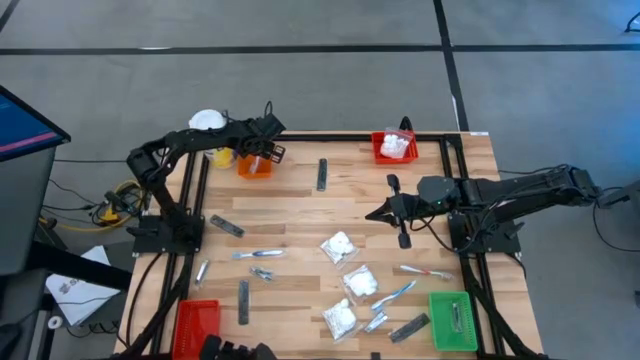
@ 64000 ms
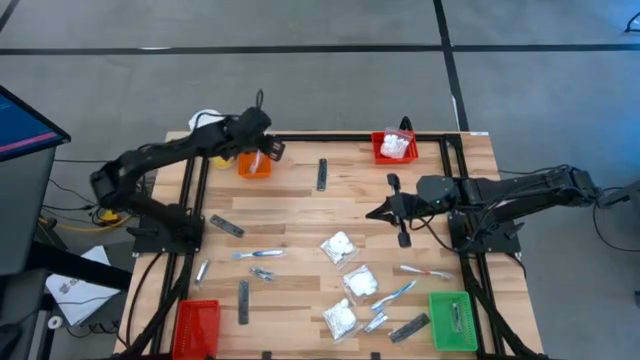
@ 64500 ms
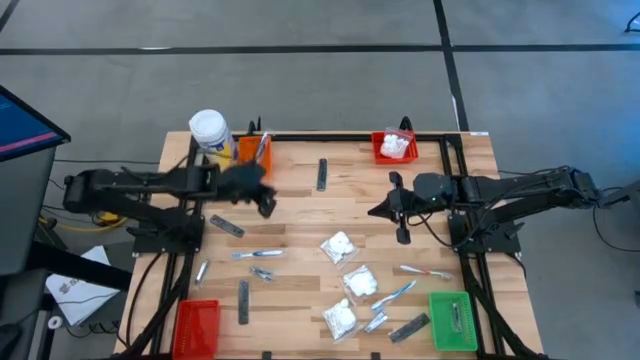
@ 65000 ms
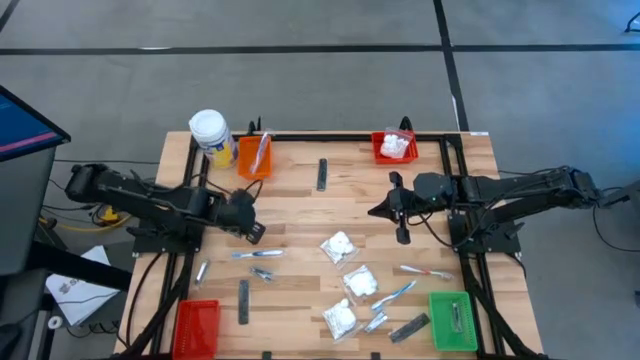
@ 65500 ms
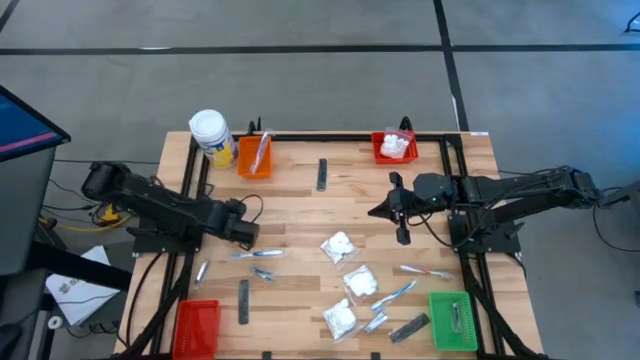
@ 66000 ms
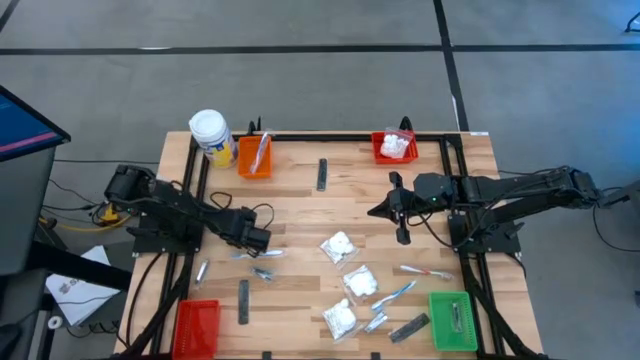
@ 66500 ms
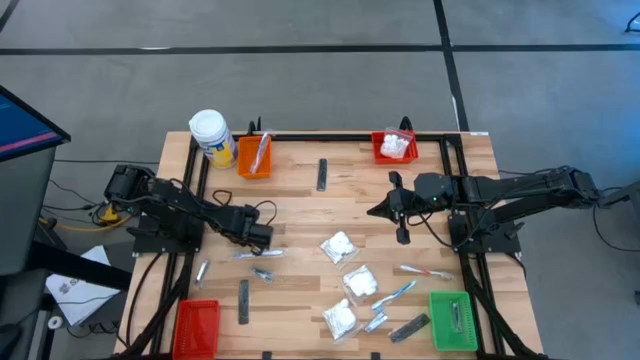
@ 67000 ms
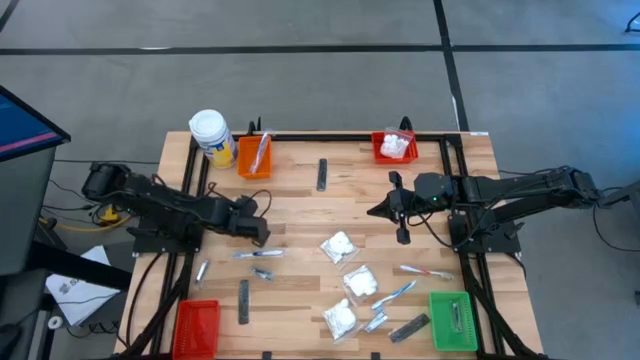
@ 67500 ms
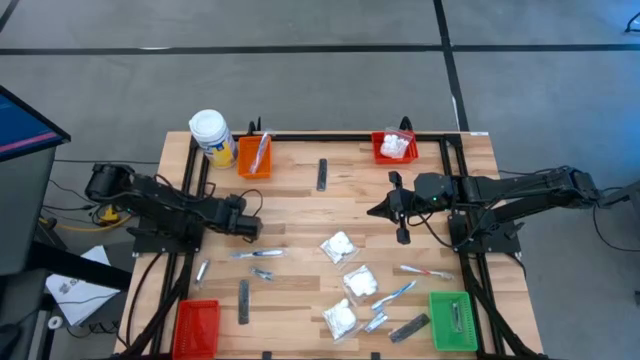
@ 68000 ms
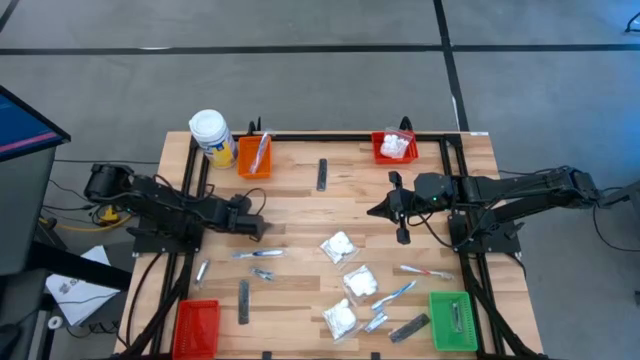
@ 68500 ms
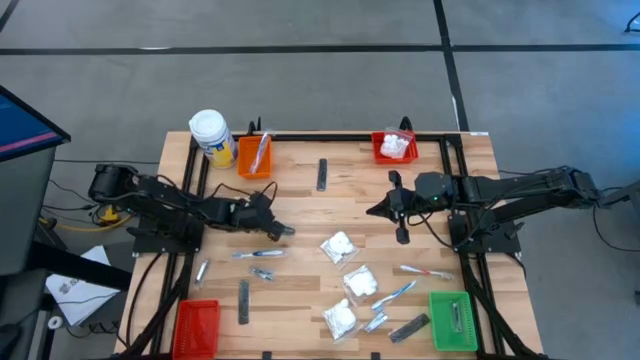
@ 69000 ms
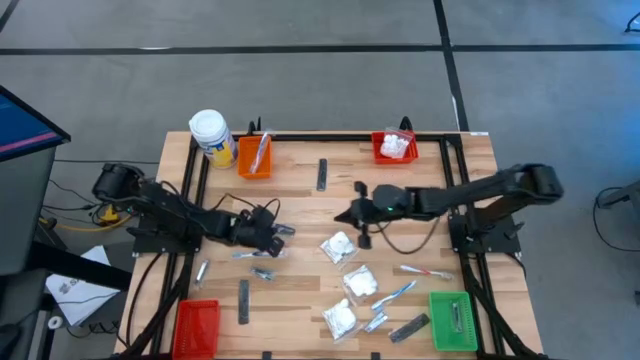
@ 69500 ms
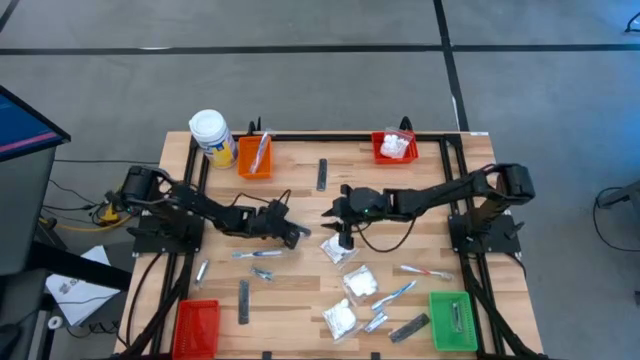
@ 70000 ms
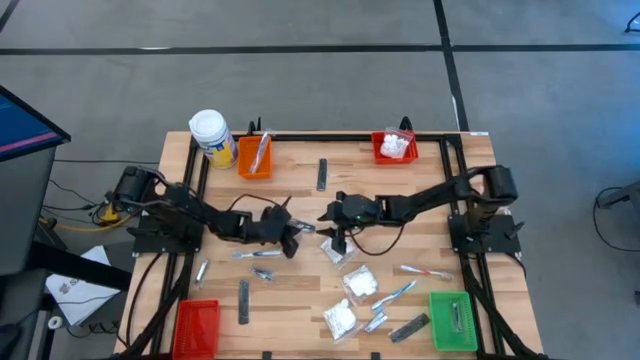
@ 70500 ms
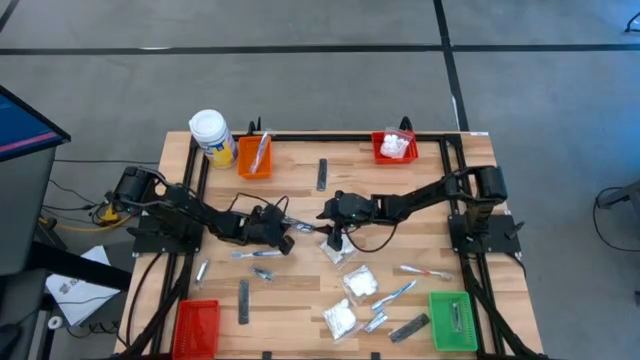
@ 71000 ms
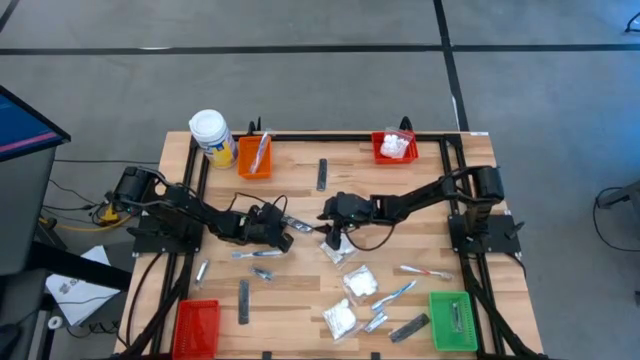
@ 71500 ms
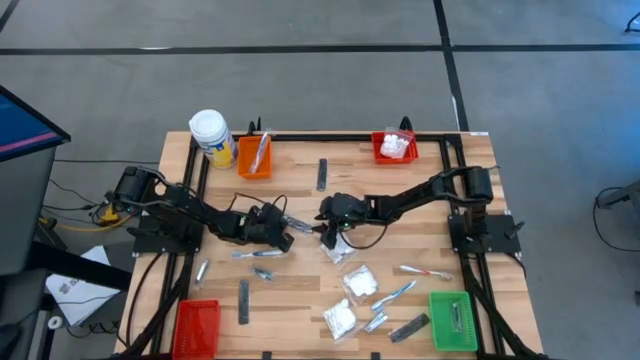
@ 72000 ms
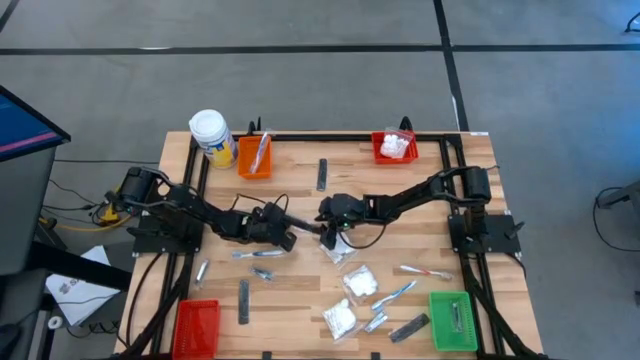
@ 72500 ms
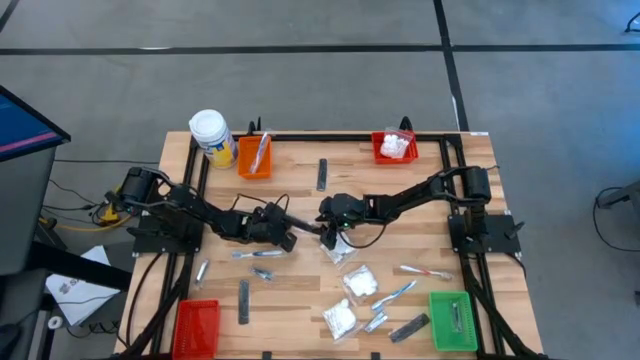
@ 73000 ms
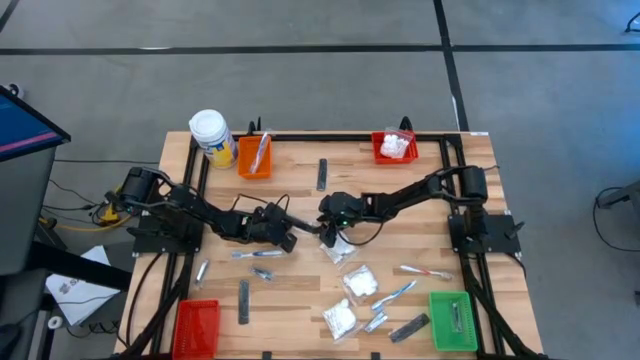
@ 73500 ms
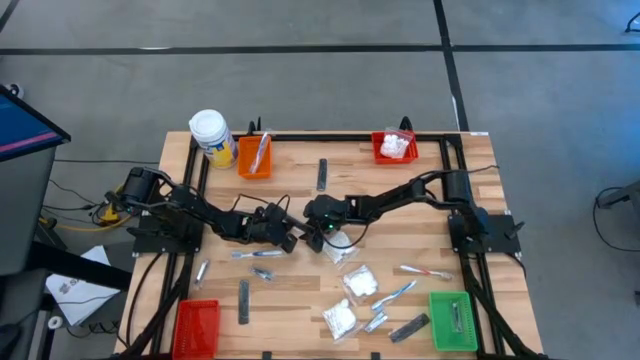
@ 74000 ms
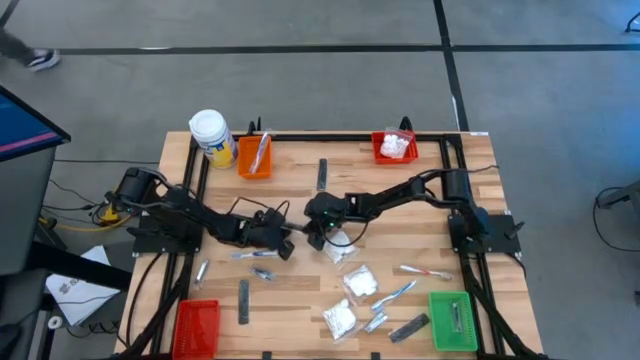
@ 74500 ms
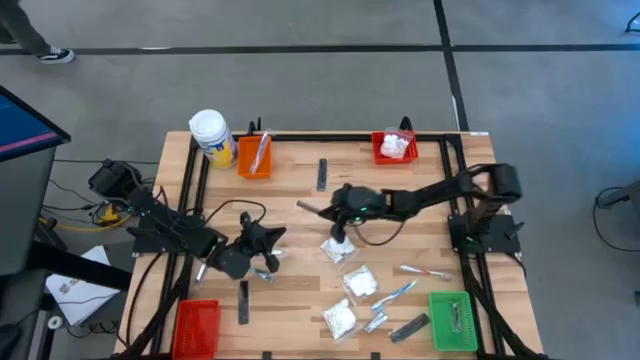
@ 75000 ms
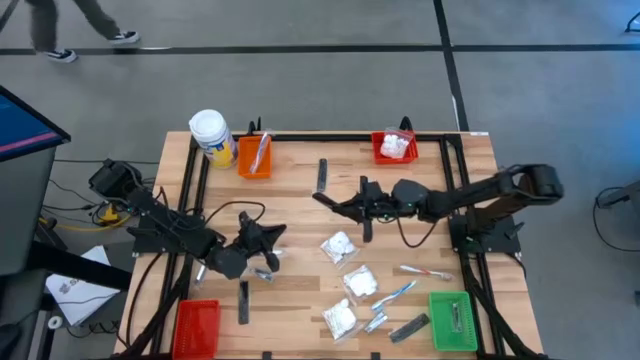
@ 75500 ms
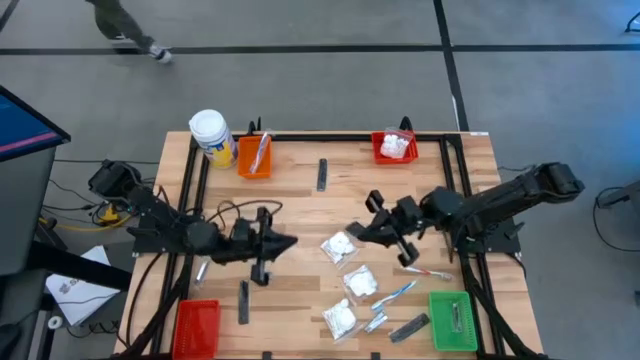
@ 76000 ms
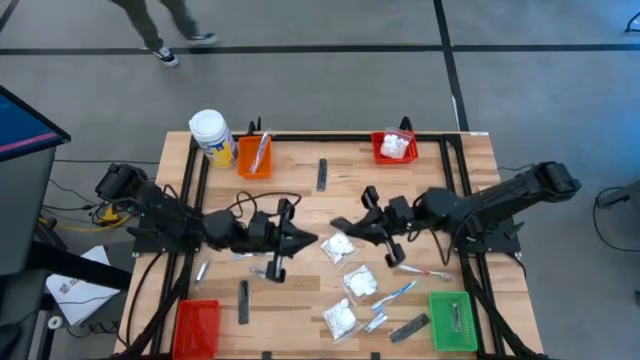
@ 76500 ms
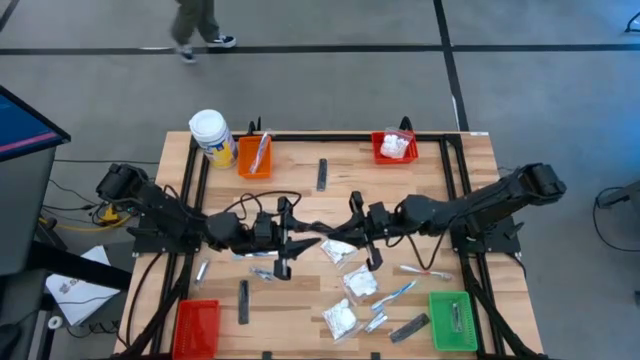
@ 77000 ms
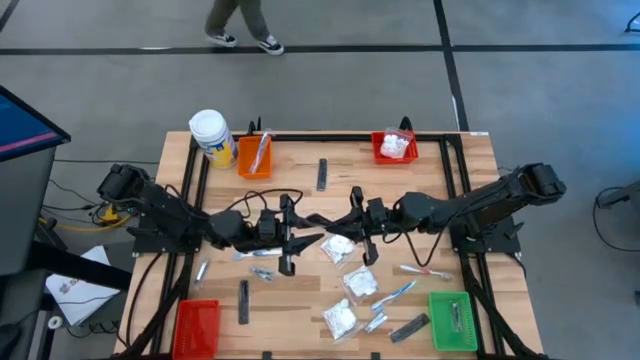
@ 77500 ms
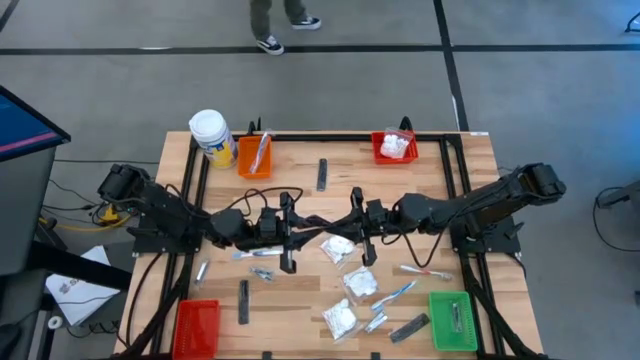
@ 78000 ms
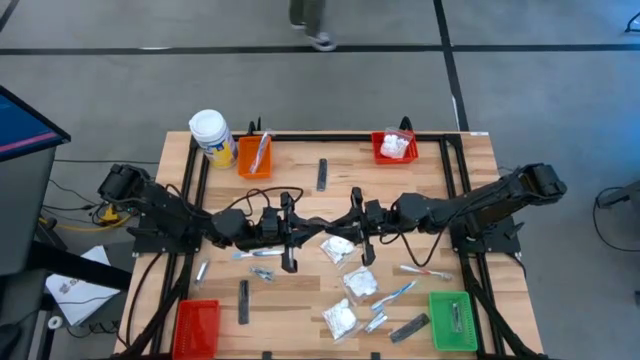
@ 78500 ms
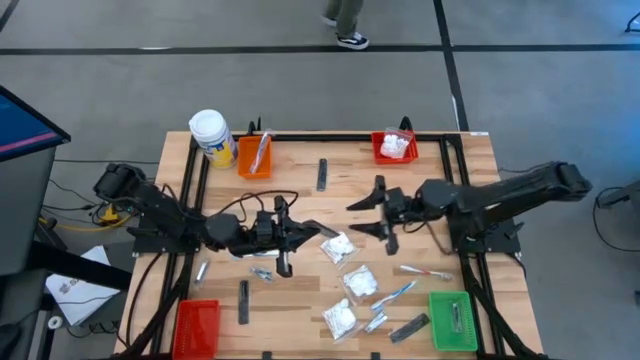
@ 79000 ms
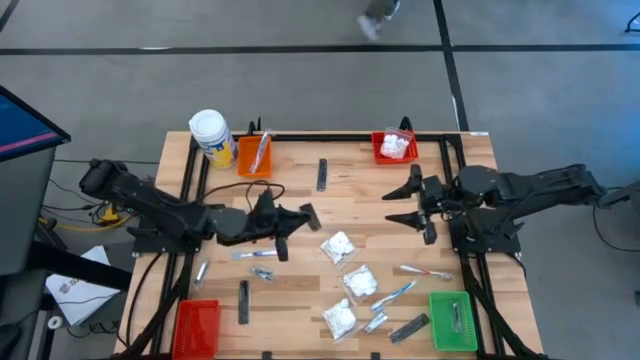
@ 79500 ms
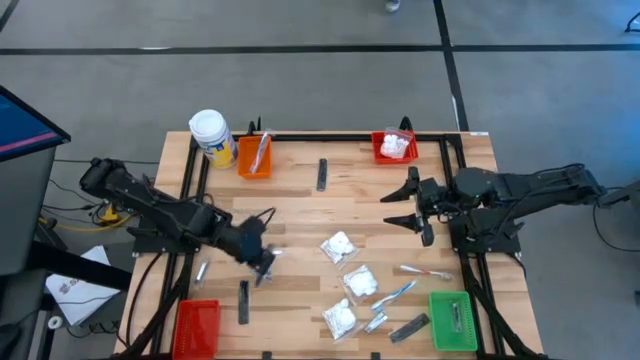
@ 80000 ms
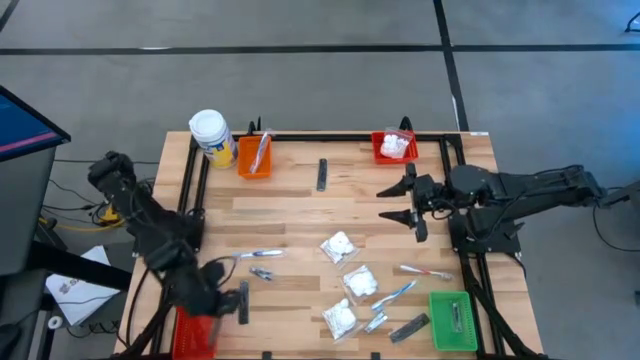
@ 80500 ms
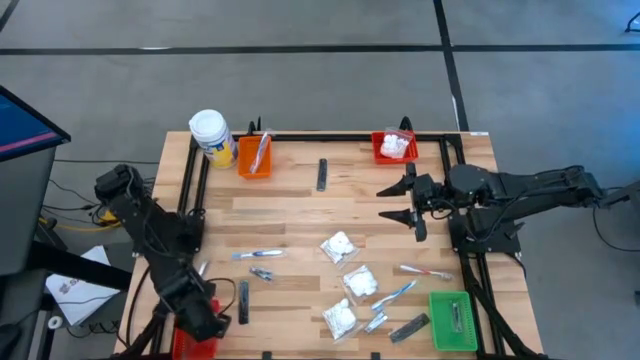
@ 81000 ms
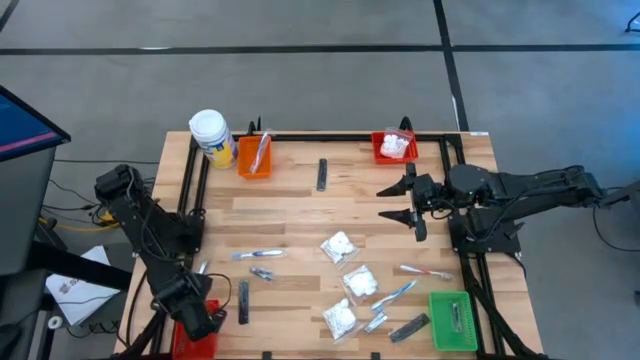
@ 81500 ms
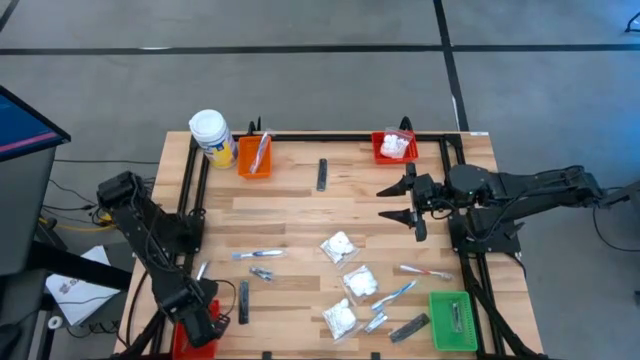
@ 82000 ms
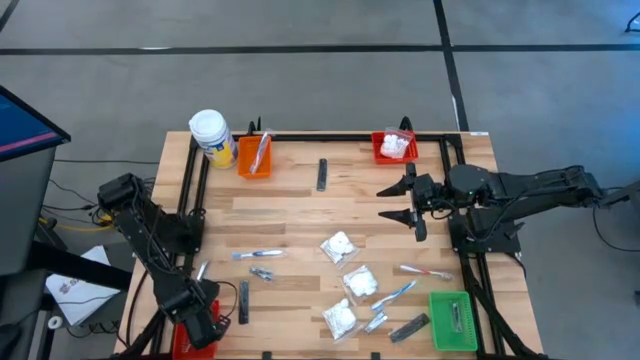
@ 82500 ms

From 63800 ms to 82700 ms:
Task: Pick & Place Travel size toiletries
Put the comb into the bottom red bin

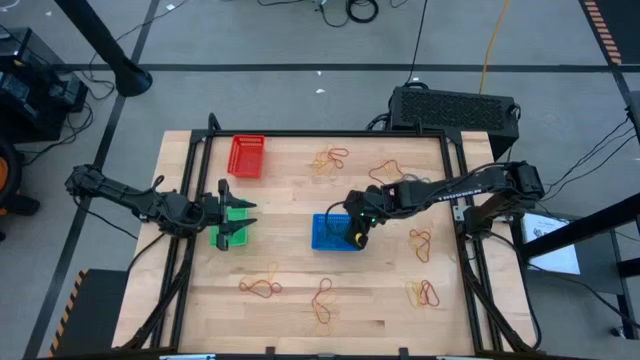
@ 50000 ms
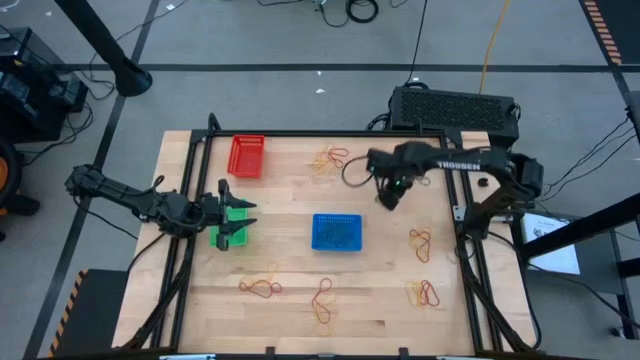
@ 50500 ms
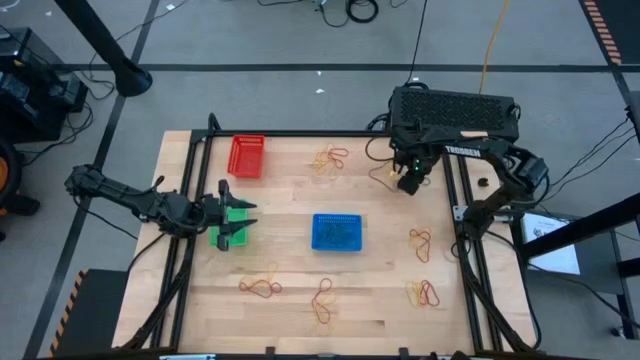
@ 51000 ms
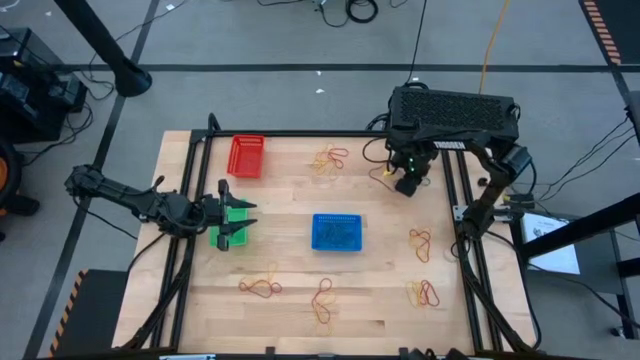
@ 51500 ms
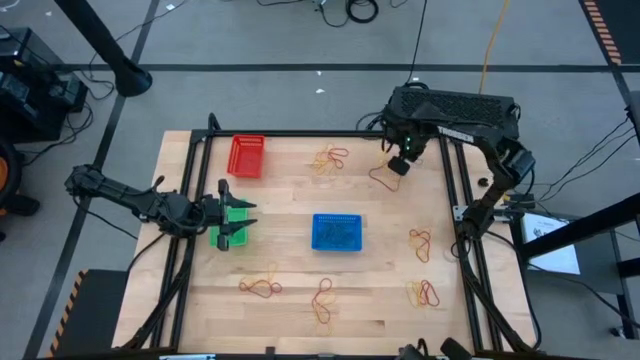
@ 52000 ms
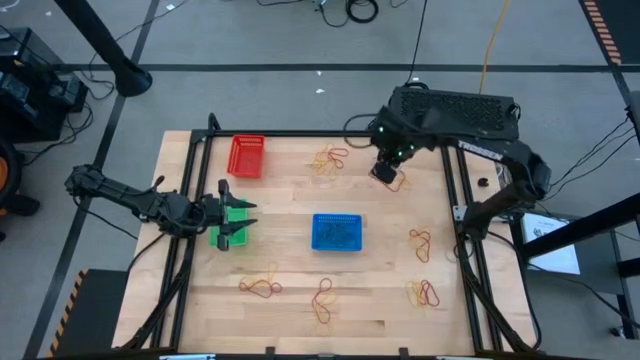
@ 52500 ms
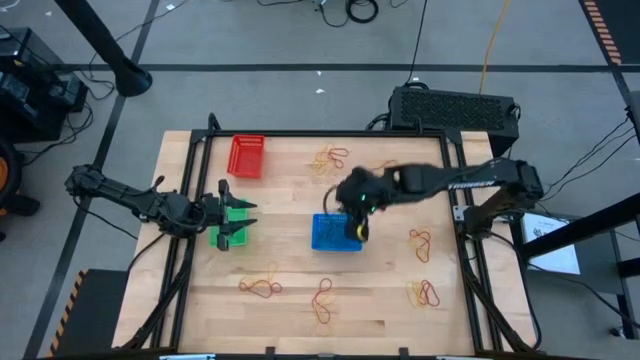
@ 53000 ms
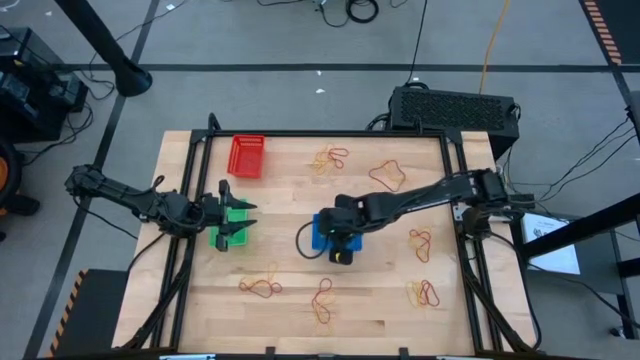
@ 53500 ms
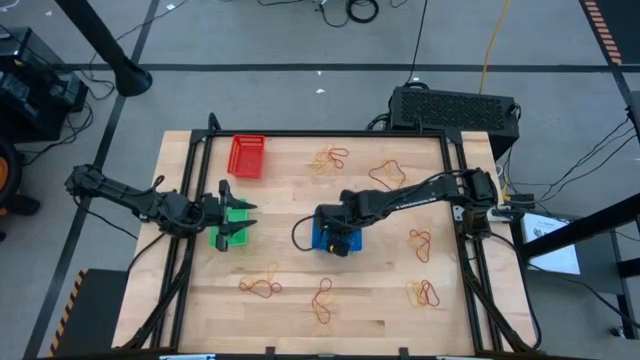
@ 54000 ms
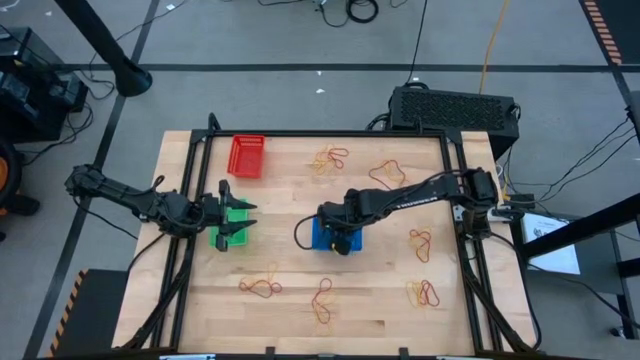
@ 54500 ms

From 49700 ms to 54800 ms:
Task: Sort rubber bands into baskets
Put the blue rubber band into the blue bin
